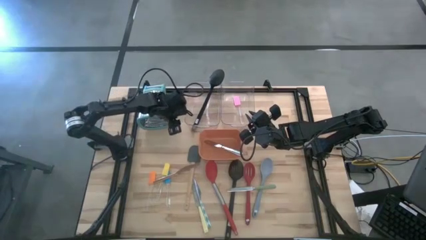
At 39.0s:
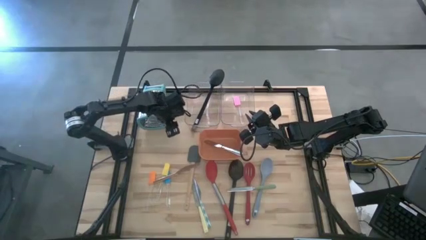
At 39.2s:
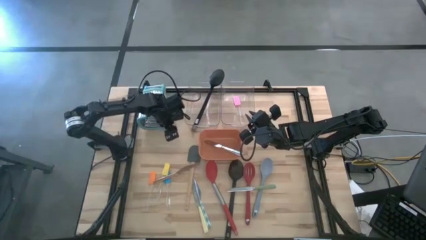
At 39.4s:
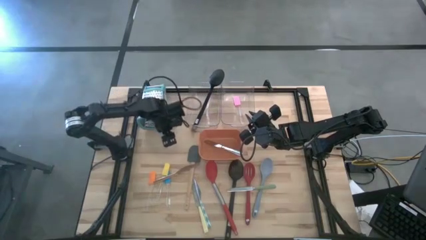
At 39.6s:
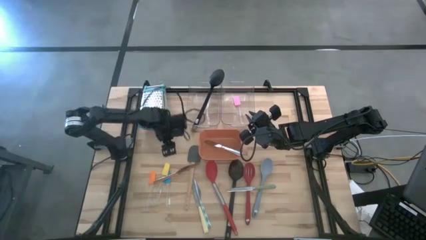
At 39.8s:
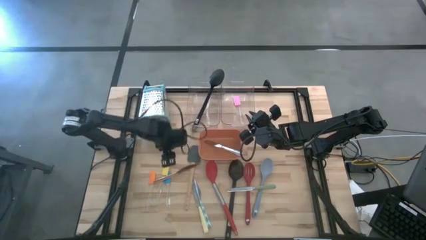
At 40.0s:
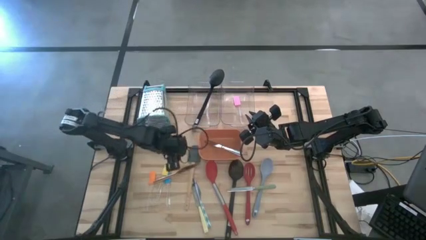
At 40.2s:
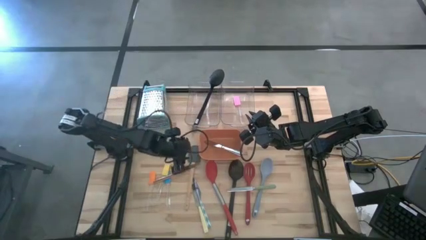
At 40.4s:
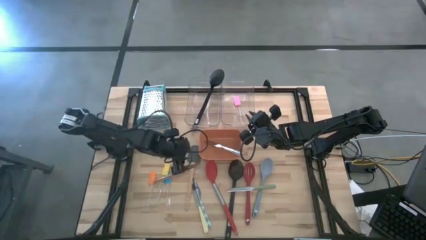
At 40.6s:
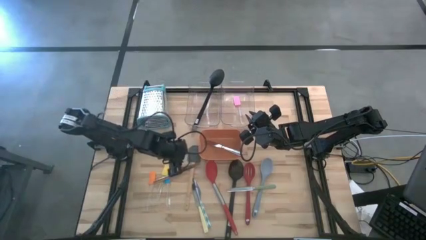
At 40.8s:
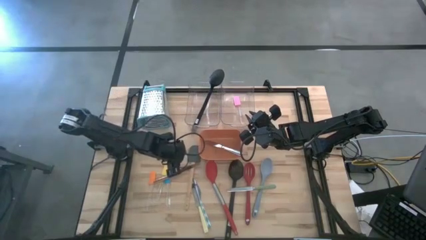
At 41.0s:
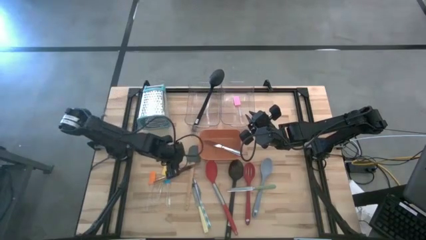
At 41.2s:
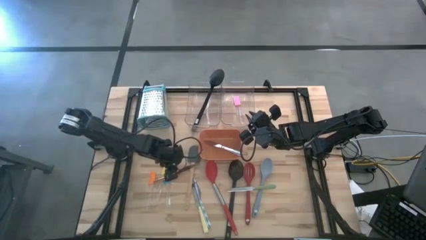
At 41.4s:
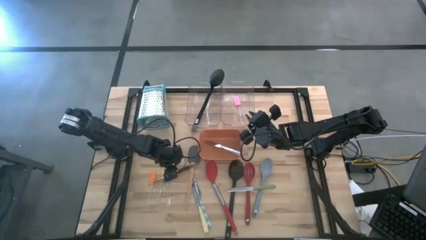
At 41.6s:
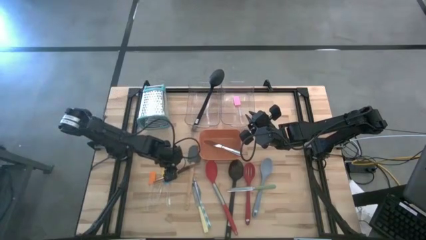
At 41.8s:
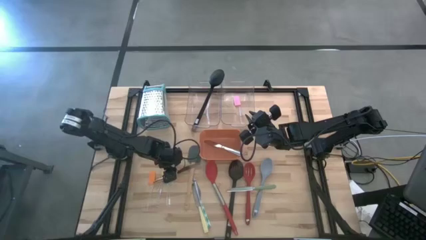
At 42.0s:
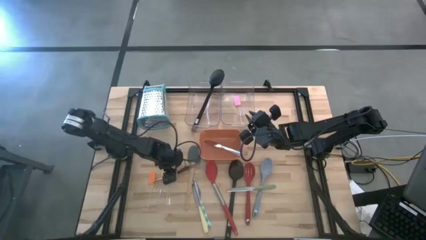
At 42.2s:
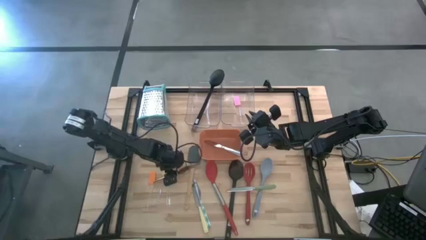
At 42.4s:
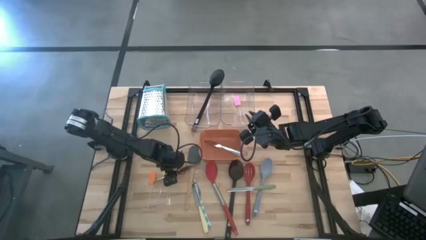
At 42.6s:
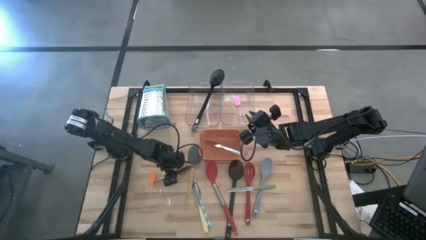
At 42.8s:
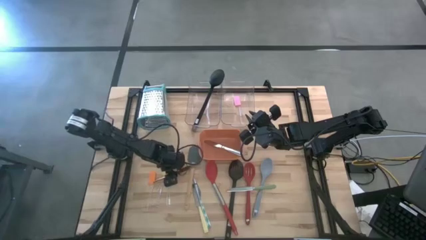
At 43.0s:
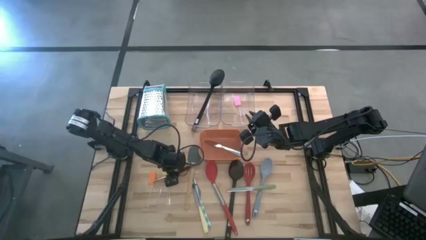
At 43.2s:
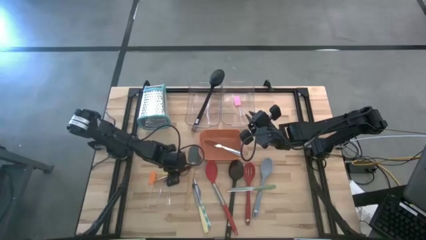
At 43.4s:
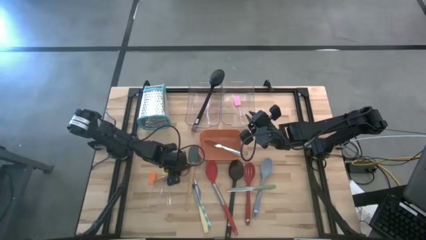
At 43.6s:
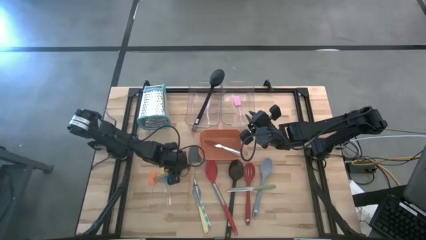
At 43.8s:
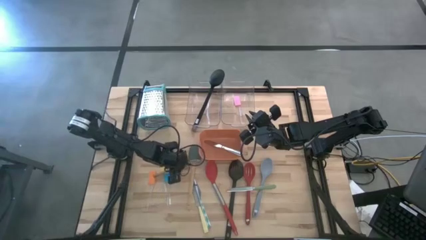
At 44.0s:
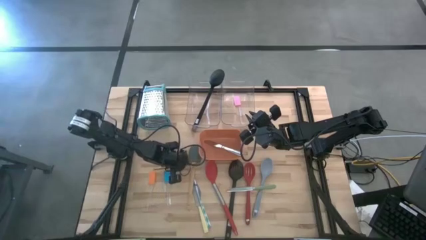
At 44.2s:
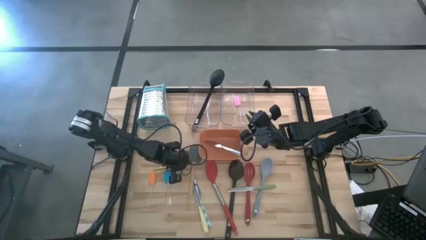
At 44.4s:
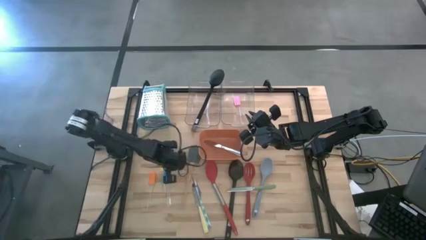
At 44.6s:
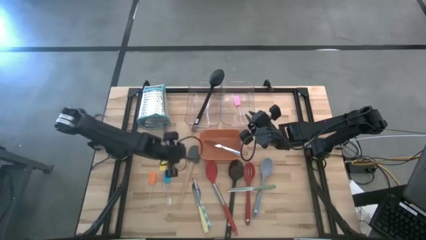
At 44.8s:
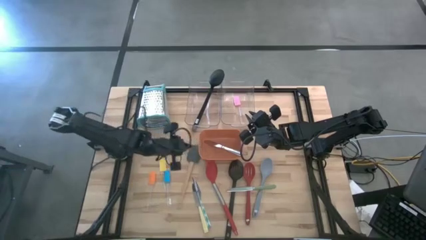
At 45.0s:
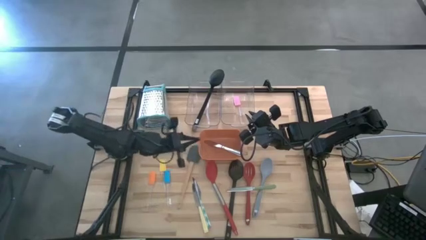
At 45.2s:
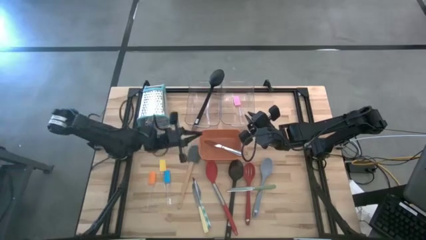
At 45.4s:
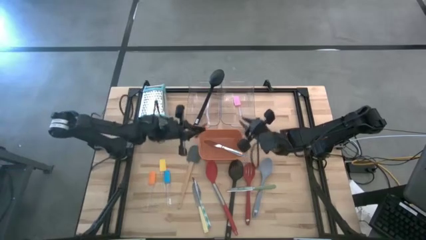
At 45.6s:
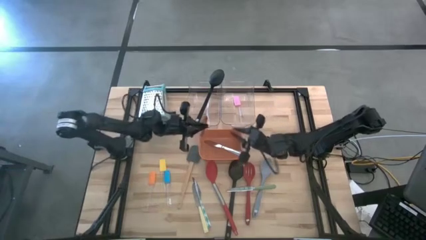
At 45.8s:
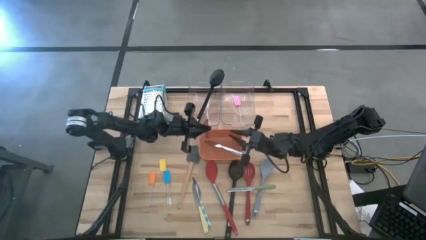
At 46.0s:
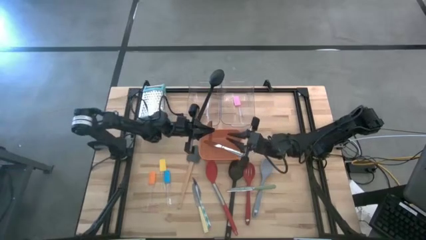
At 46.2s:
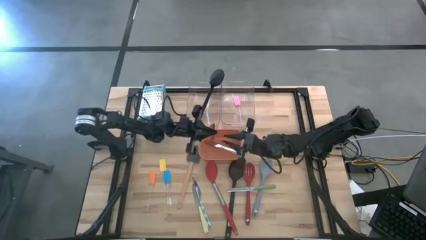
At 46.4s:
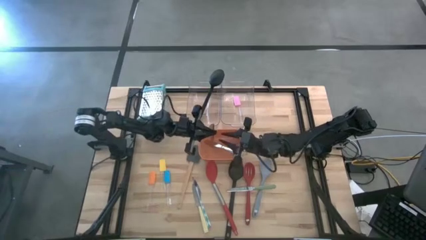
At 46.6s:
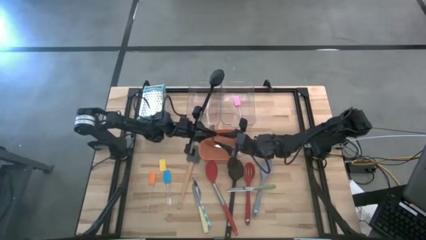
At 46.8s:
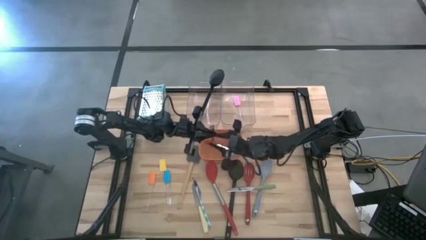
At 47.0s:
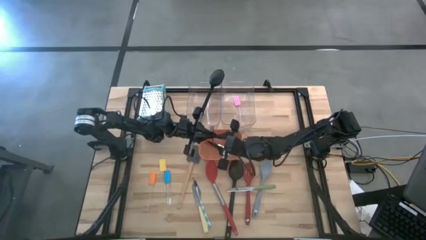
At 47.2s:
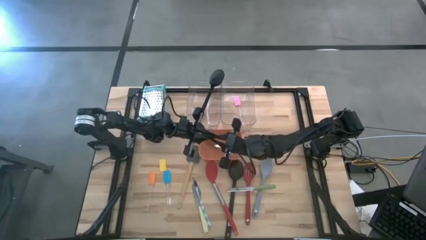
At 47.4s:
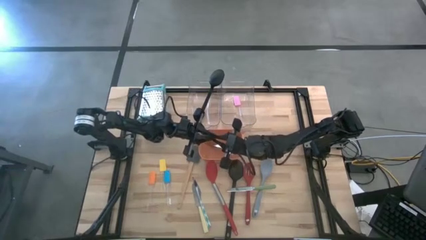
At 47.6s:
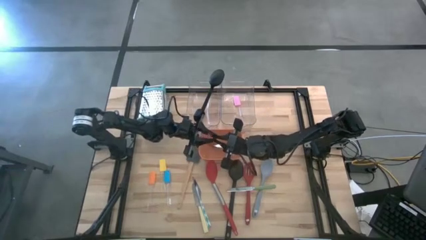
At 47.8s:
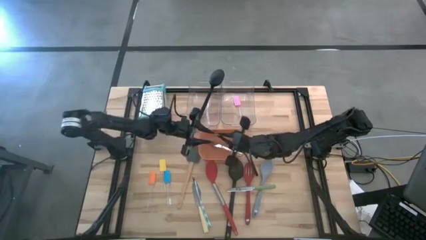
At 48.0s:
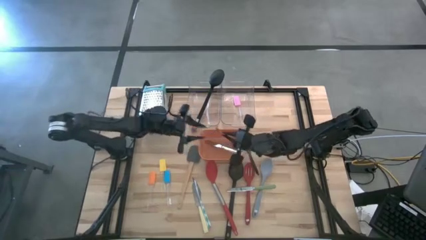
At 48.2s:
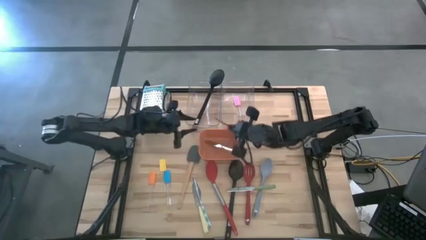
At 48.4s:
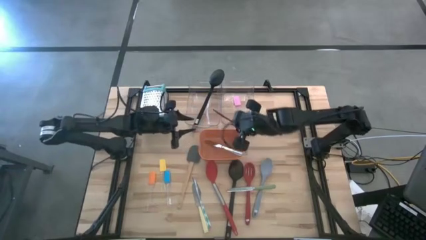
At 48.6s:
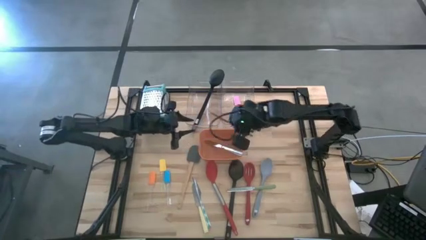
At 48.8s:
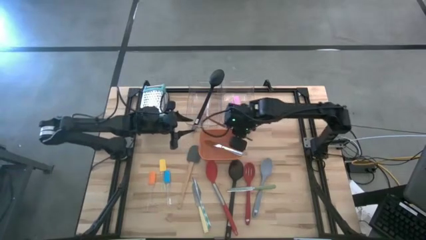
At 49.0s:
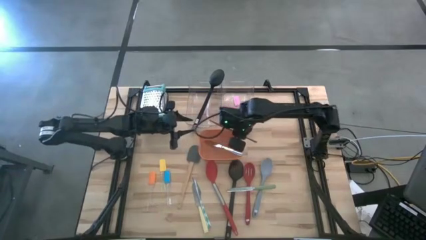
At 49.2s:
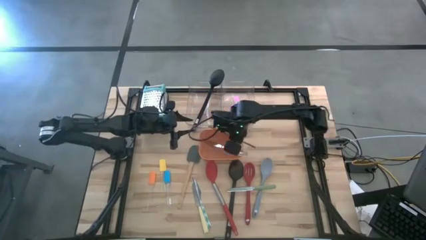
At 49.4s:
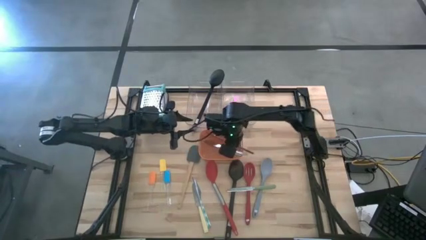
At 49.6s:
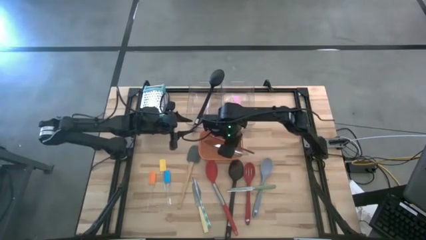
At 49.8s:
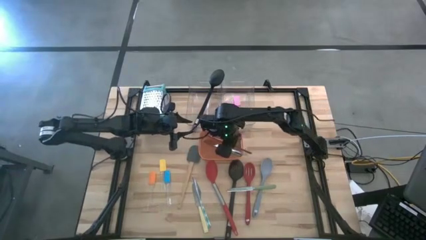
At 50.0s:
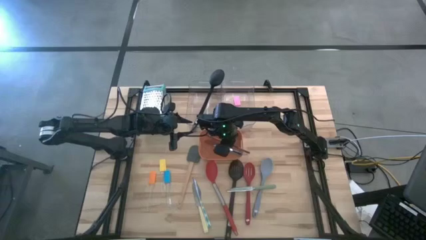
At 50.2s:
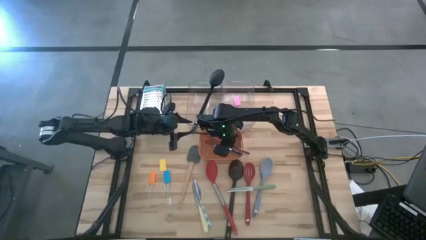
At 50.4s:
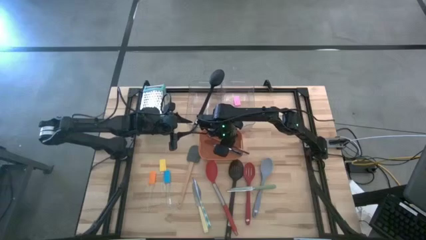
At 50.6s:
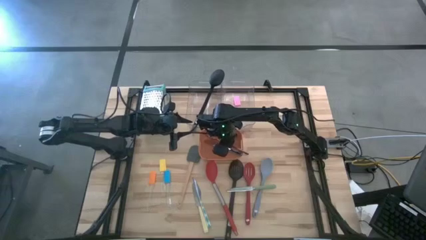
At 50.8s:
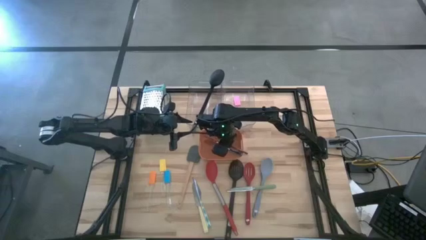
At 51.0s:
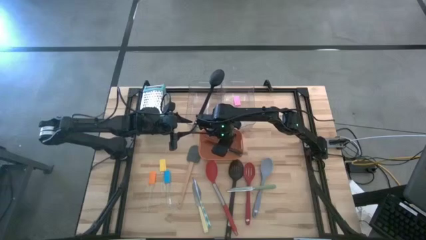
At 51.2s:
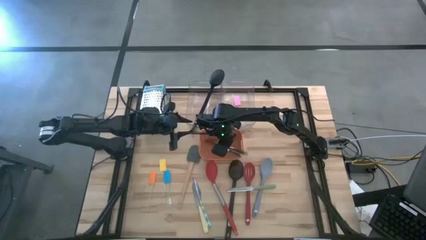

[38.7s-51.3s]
Task: Pick & Place Kitchen Items
Put the brown knife into the orange bin

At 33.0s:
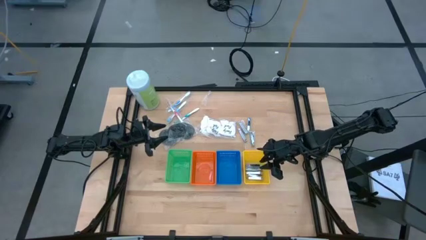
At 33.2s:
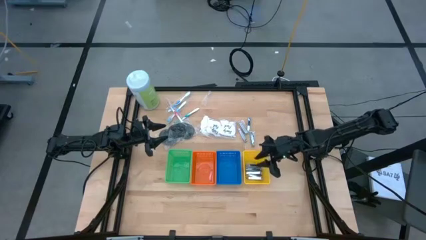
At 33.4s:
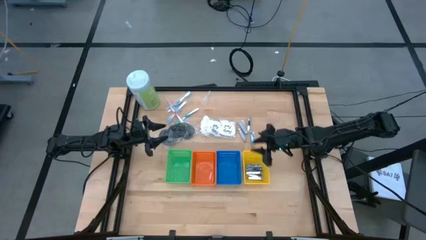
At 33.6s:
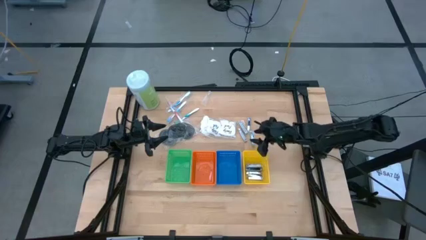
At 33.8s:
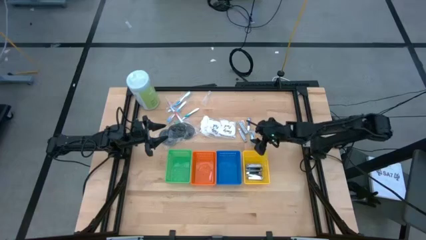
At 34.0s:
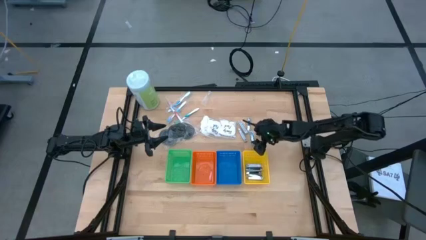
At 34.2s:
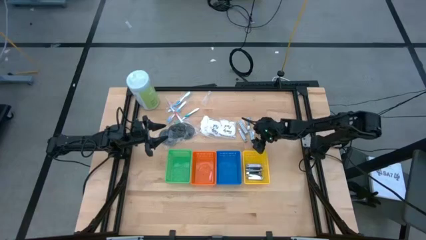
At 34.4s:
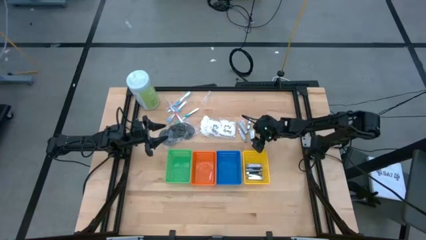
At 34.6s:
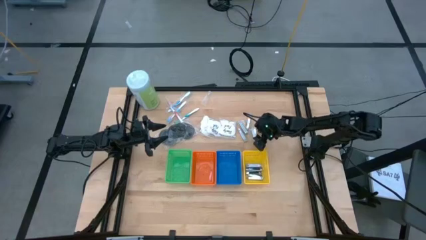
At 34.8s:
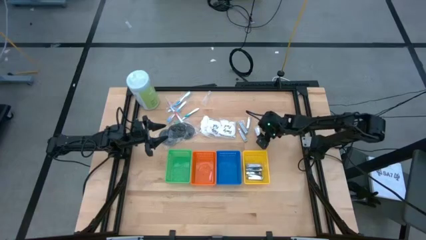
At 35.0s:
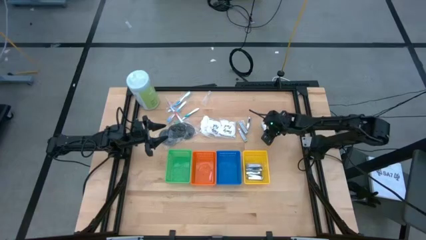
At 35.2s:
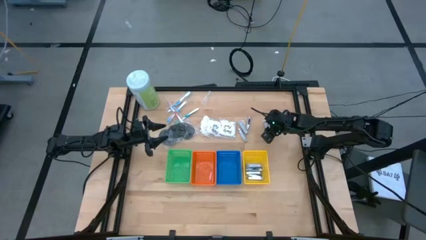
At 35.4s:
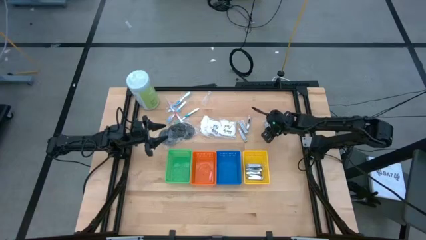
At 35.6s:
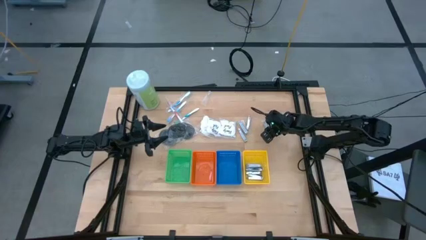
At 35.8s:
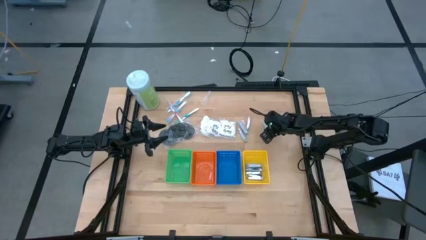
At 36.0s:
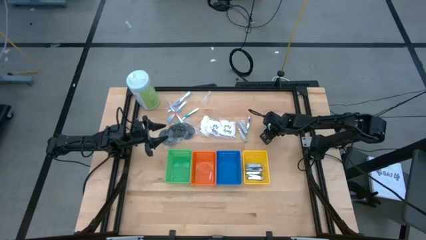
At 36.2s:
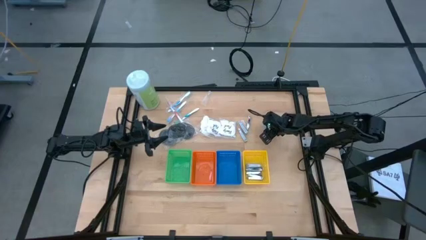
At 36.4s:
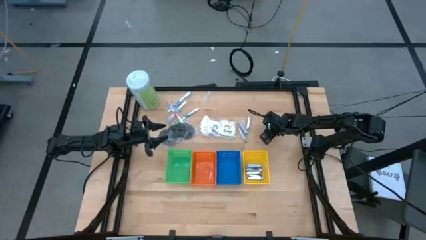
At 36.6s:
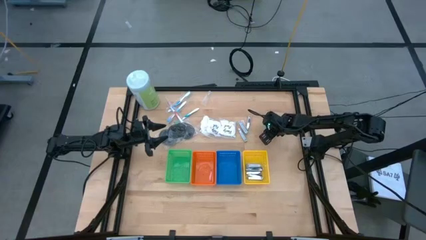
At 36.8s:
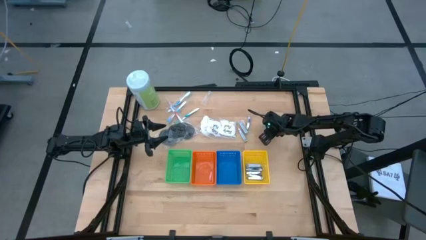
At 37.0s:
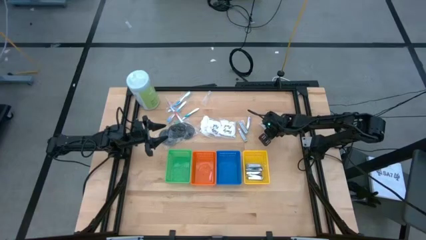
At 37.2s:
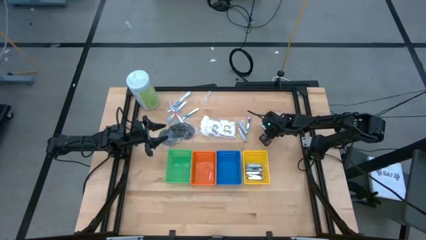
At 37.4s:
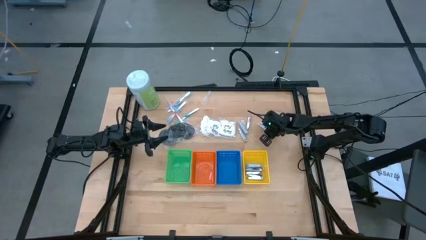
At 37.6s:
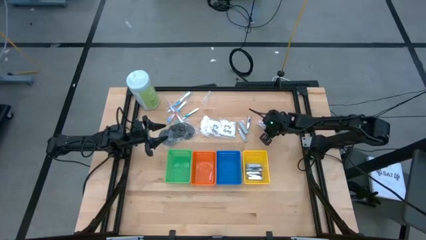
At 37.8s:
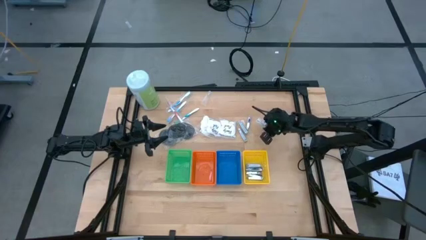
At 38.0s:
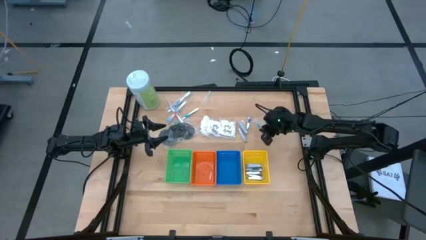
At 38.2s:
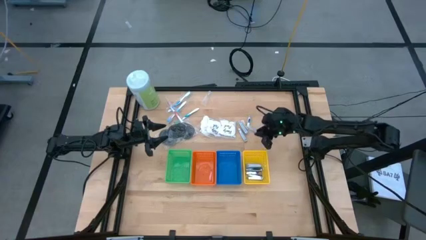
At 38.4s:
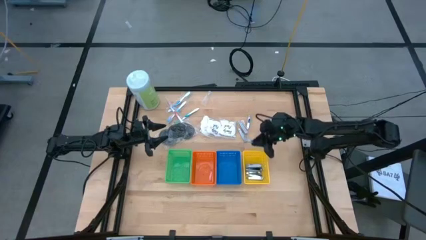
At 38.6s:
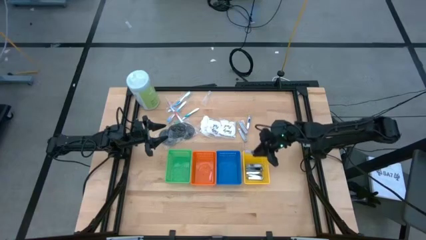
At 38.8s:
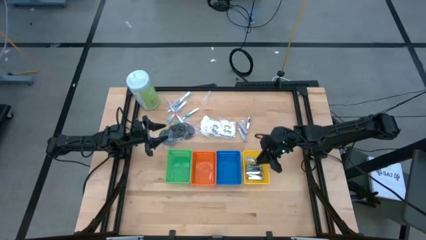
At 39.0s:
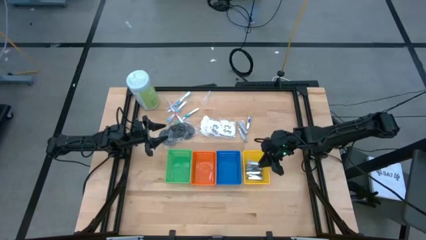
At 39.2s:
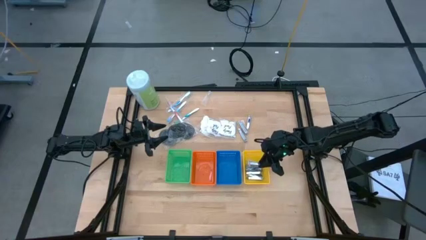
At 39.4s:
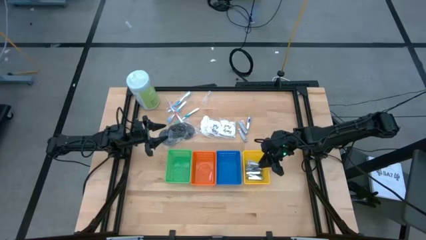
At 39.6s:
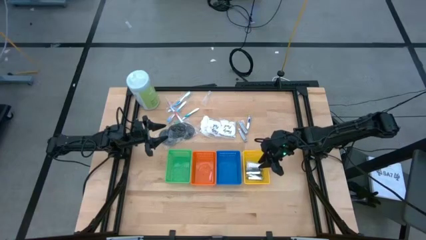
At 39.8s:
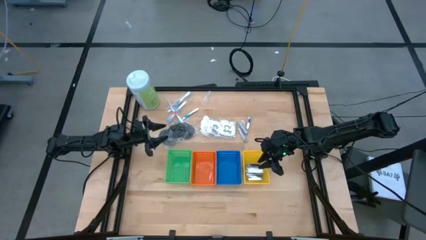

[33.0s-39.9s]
Task: Pick & Place Travel size toiletries
Put the silver nail cutter into the yellow basket
